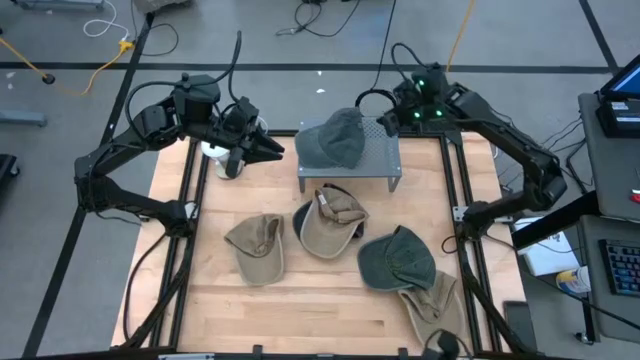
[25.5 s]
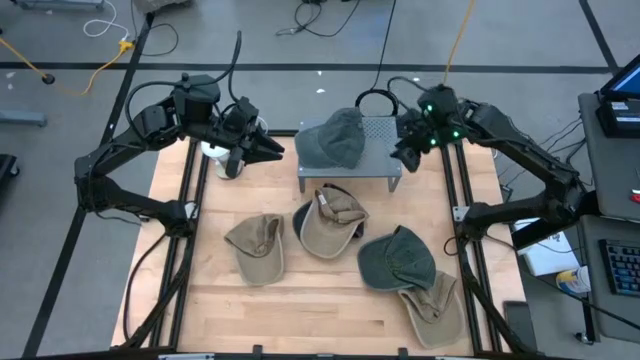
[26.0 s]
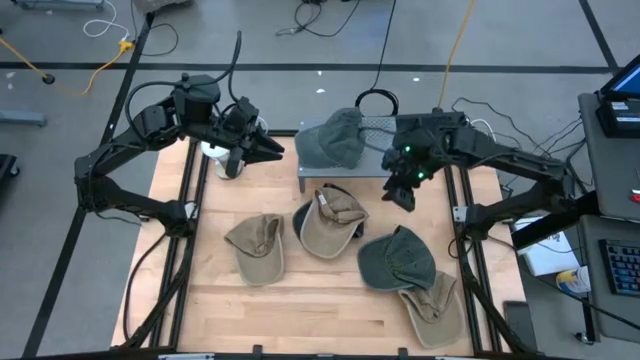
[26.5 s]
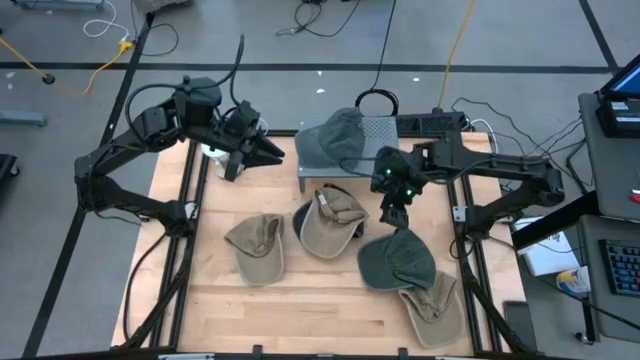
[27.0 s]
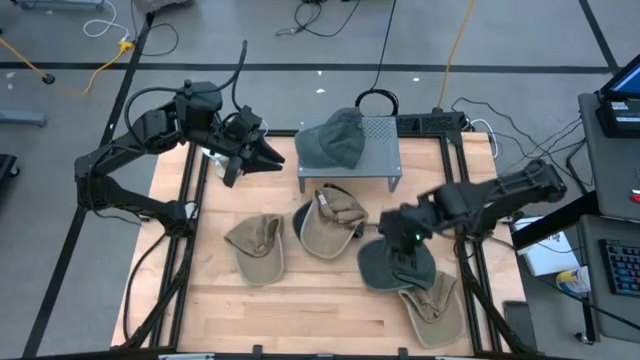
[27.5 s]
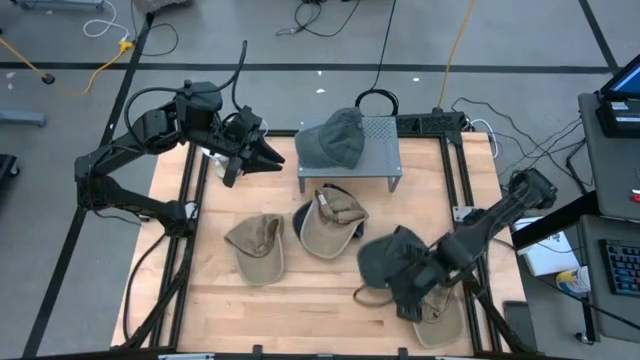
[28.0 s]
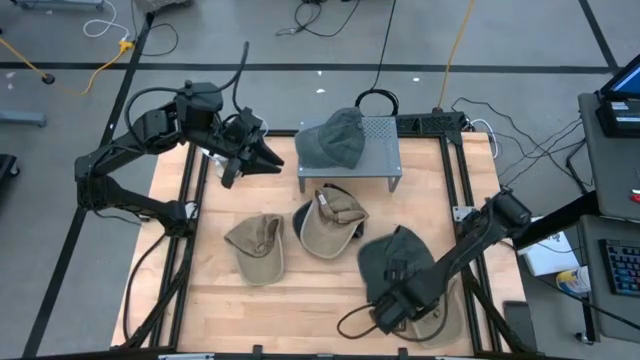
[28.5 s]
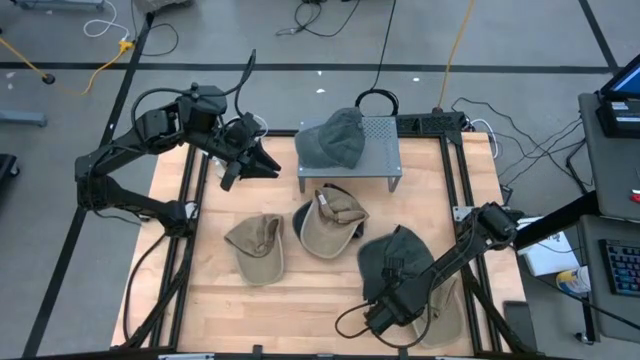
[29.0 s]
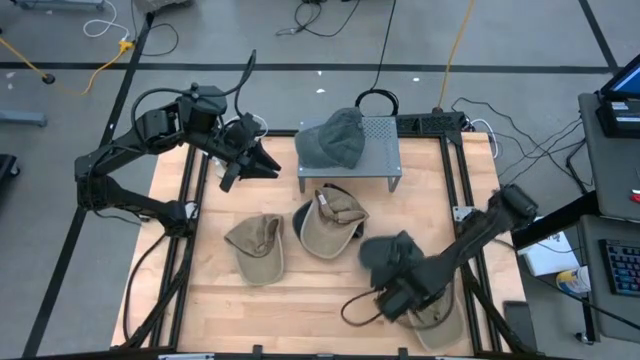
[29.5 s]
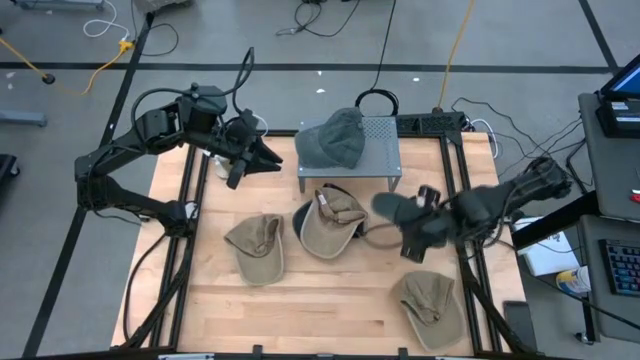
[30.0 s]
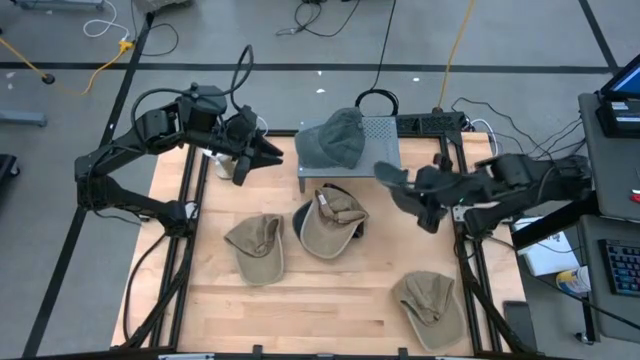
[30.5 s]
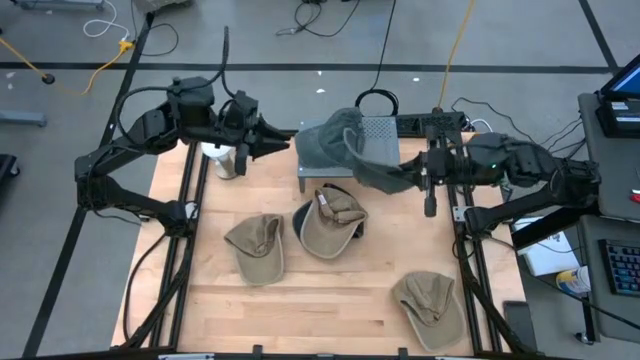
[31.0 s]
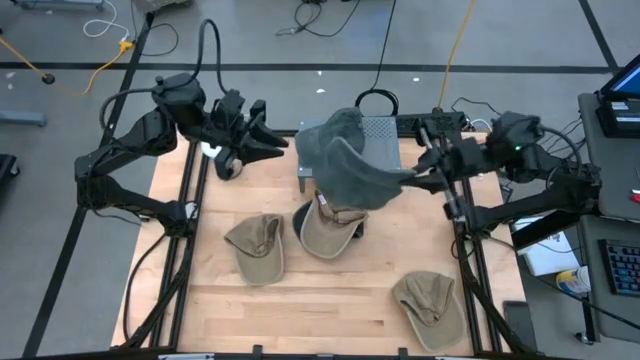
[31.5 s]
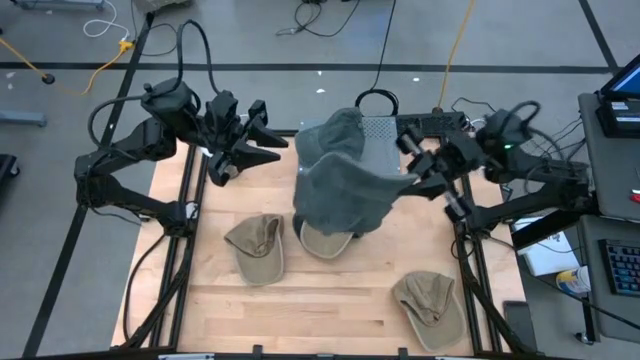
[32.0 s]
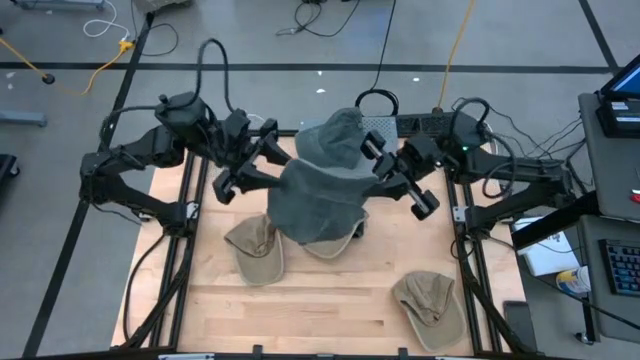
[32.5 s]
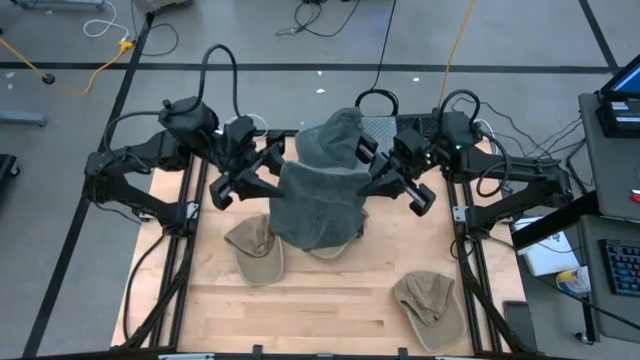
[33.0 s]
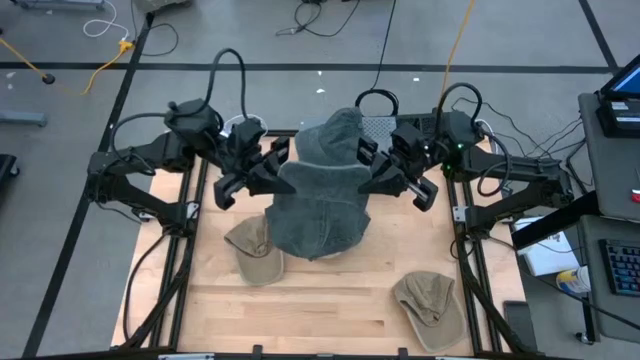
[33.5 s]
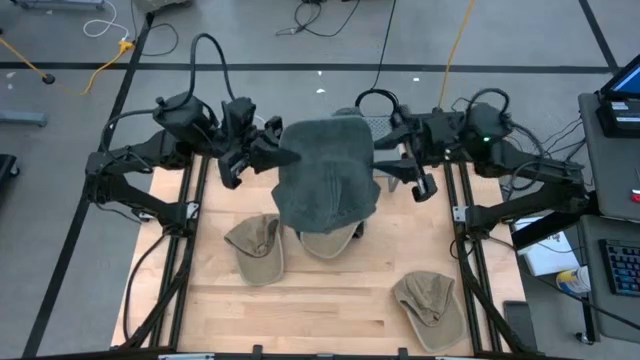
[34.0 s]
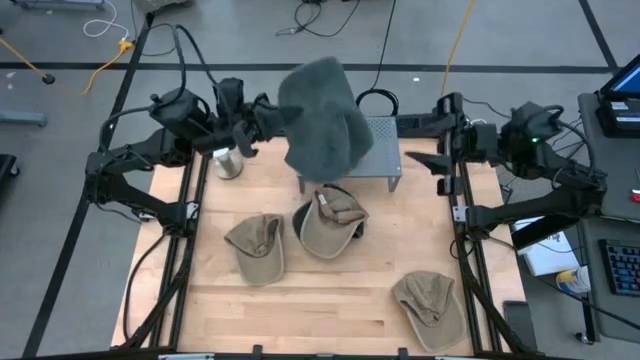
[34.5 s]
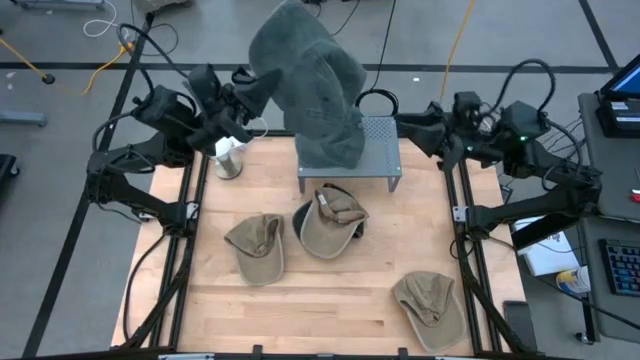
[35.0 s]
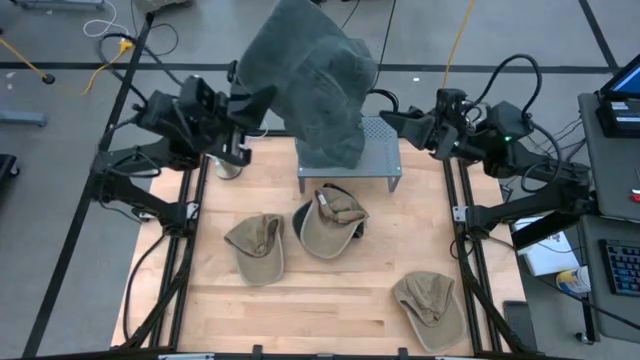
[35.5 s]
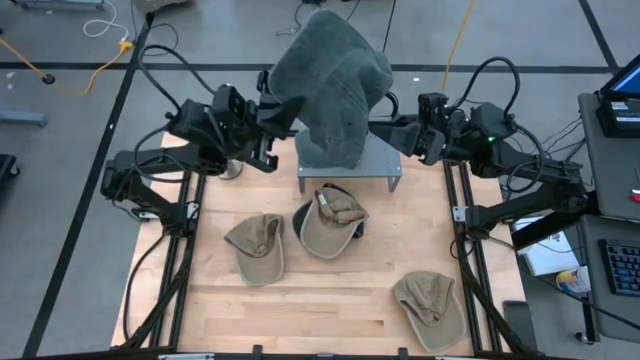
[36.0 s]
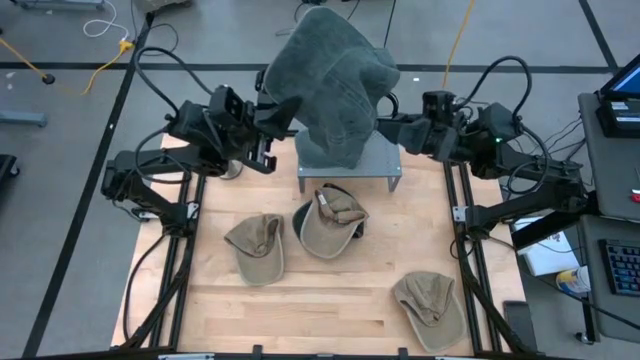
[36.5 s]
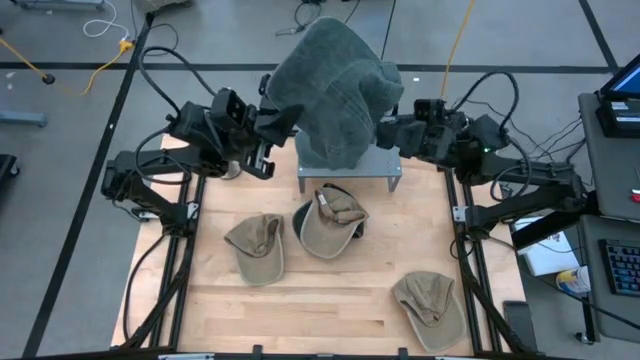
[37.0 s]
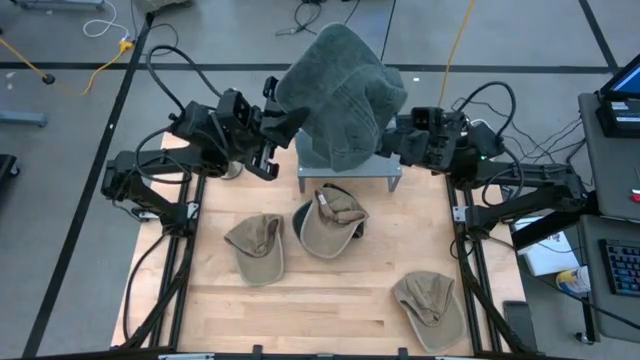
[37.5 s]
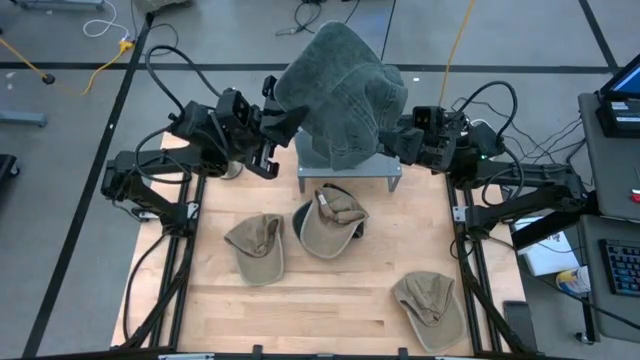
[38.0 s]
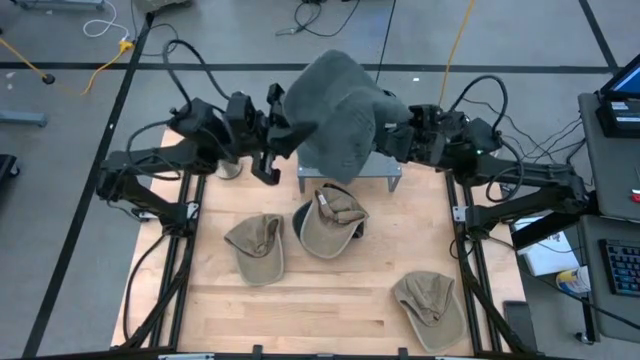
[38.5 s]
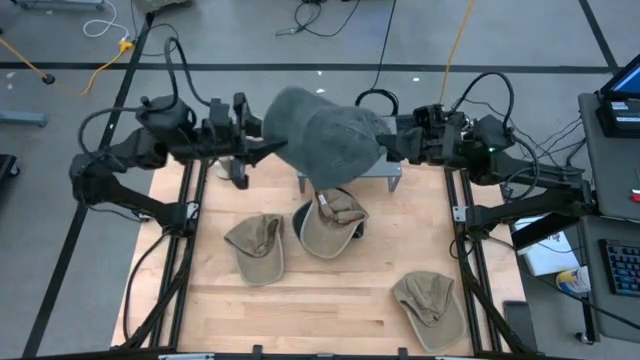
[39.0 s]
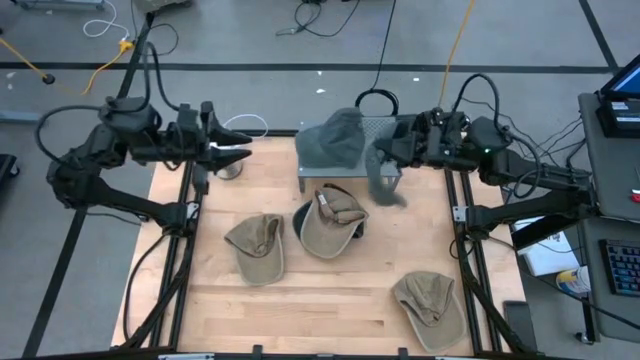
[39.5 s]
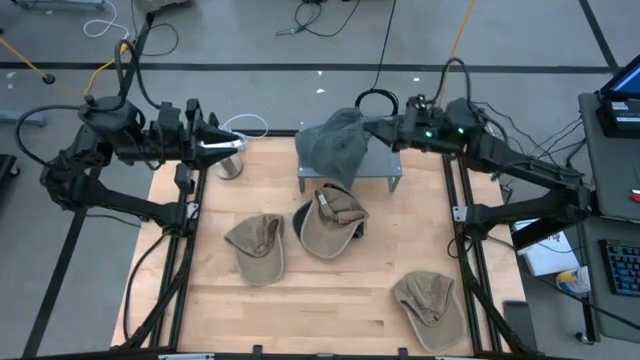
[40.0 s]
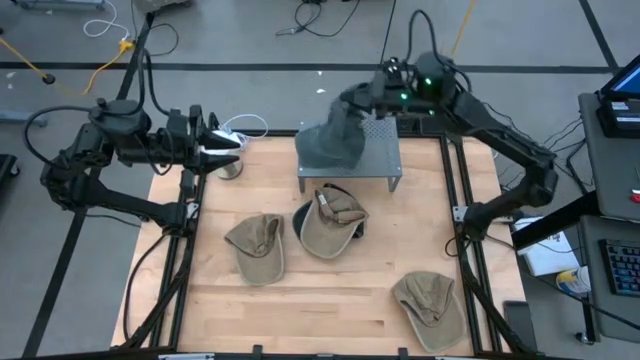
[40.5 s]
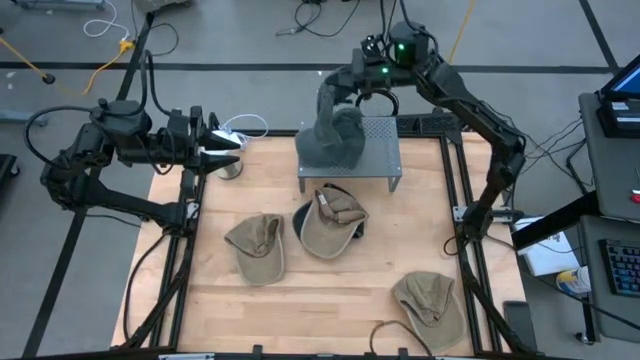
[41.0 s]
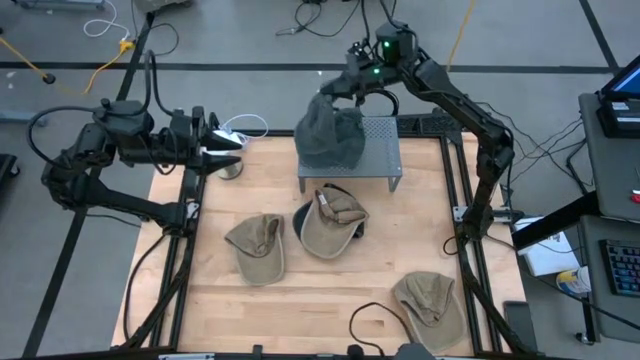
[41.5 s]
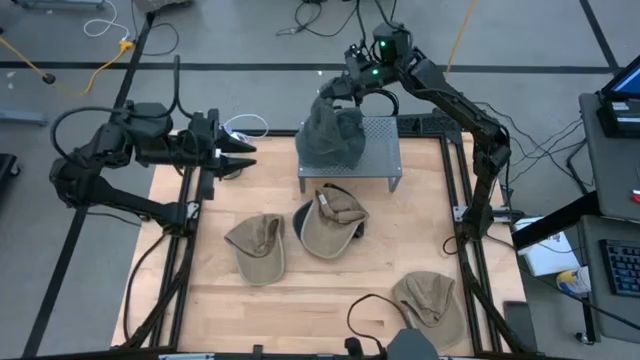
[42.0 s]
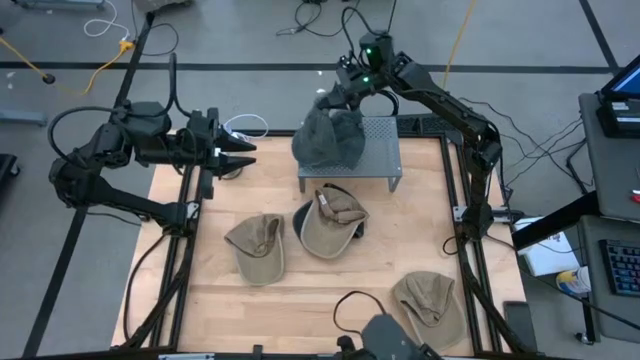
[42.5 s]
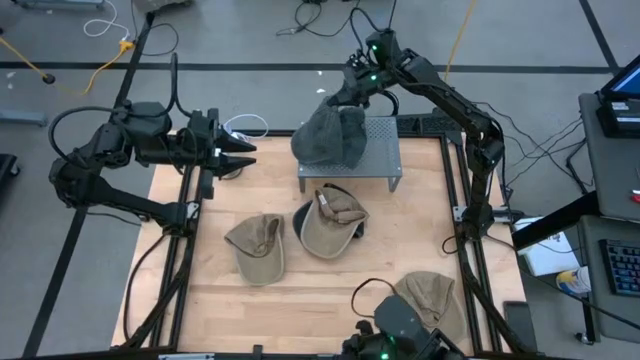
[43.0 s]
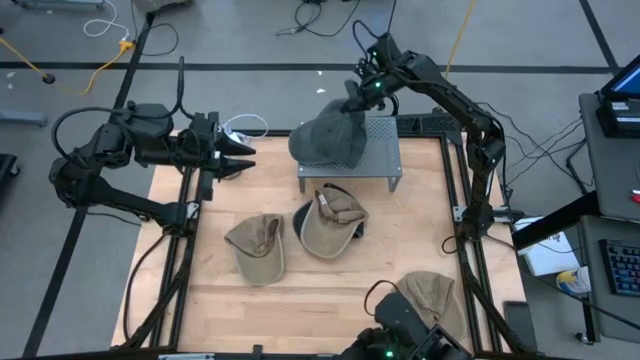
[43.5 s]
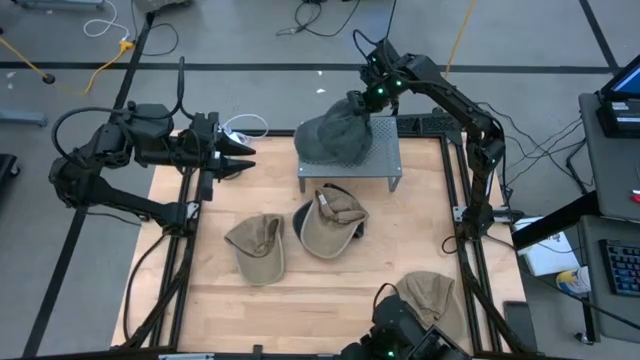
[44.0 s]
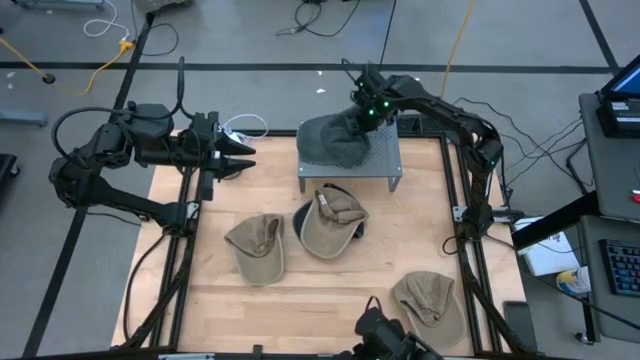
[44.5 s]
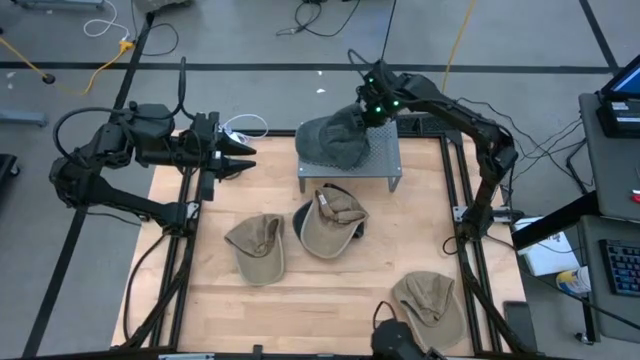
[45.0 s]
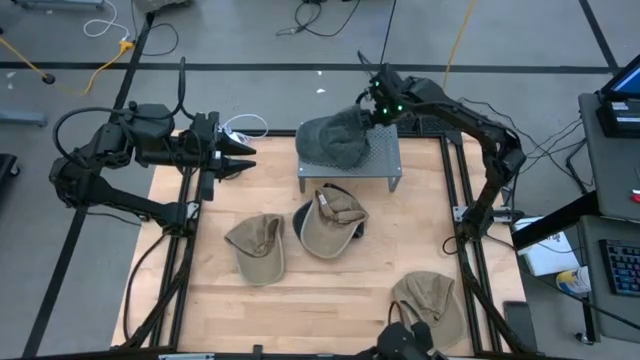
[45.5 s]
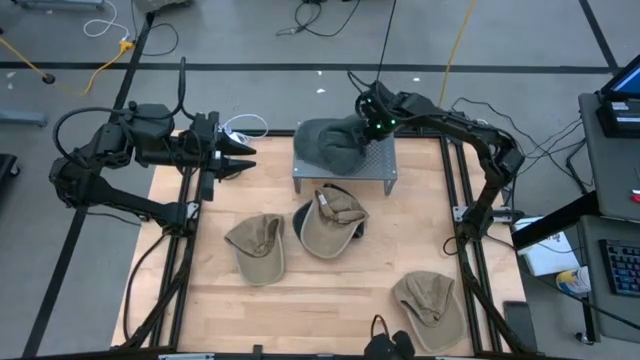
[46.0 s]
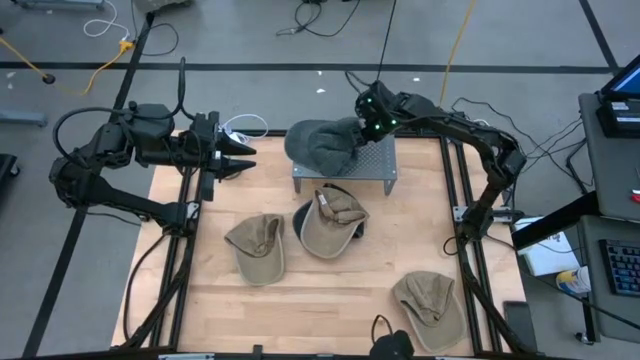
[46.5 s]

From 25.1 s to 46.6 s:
Task: Pick & Place hat
Stack the green cap on top of the green cap on the shelf
